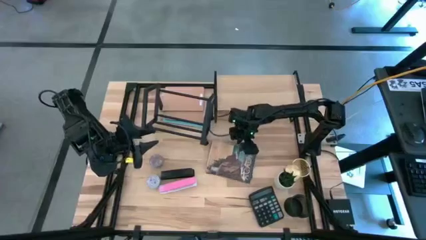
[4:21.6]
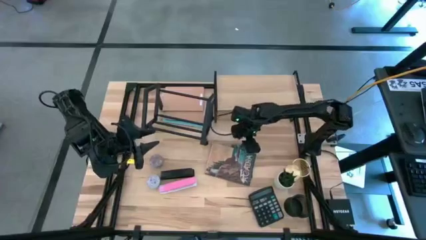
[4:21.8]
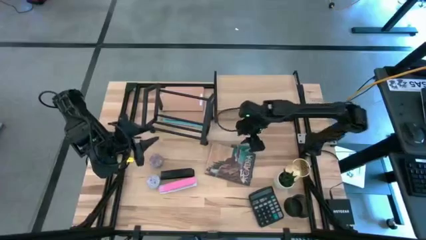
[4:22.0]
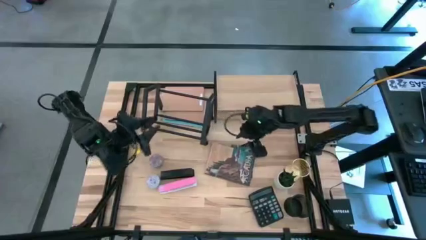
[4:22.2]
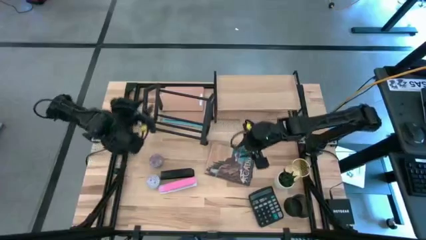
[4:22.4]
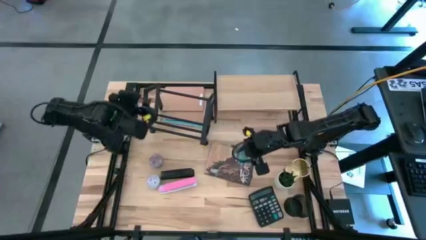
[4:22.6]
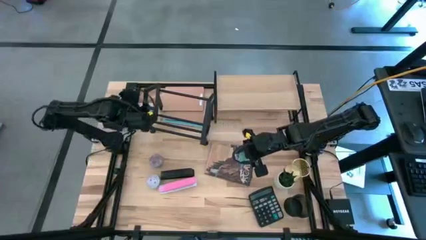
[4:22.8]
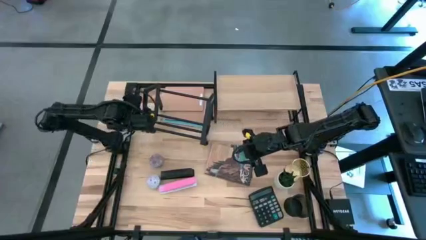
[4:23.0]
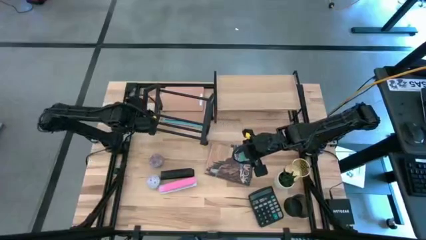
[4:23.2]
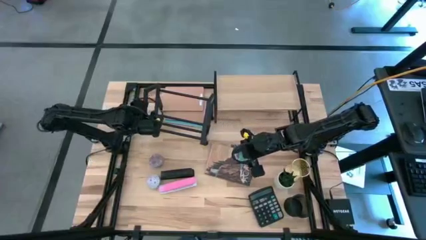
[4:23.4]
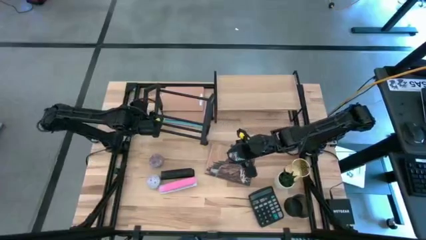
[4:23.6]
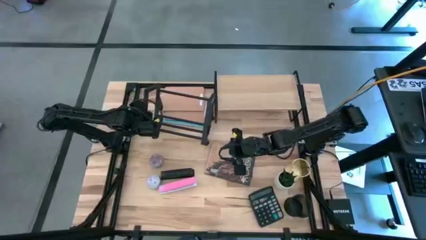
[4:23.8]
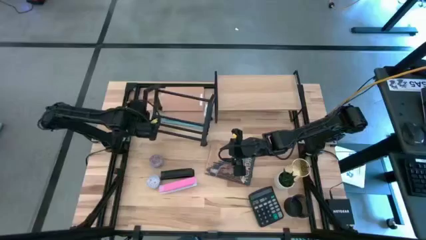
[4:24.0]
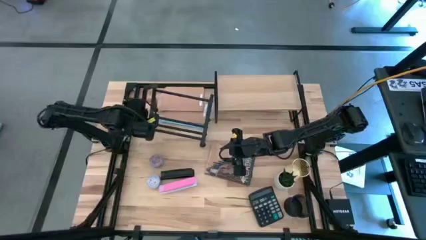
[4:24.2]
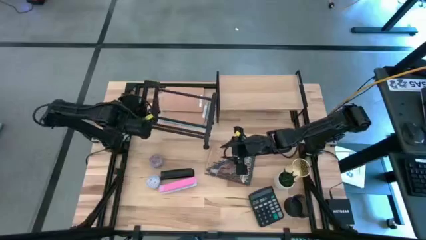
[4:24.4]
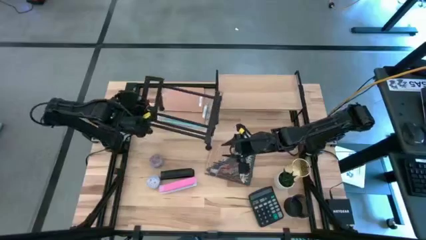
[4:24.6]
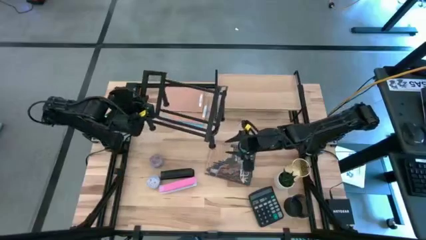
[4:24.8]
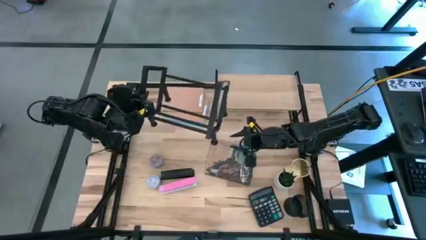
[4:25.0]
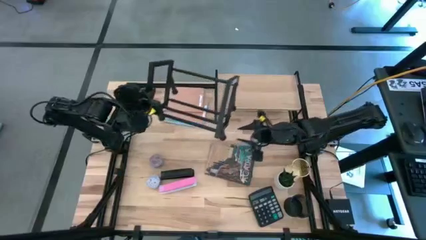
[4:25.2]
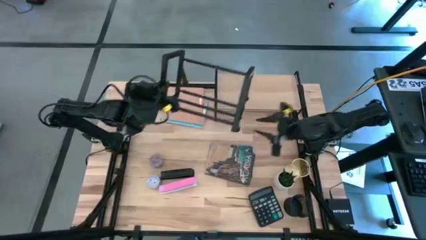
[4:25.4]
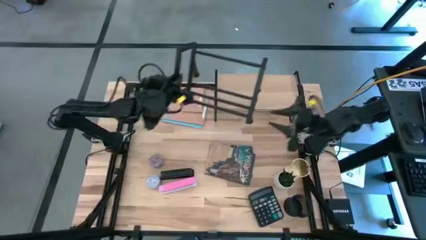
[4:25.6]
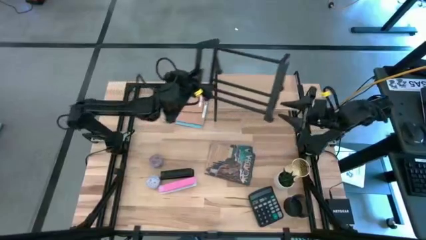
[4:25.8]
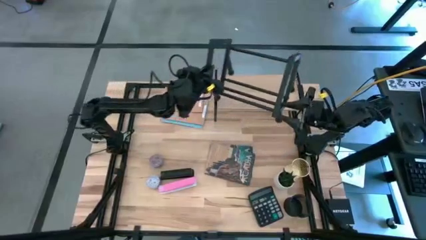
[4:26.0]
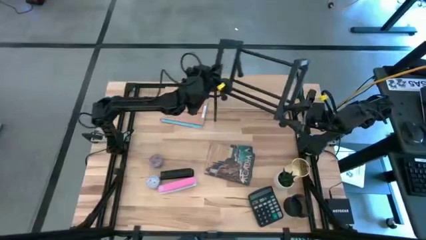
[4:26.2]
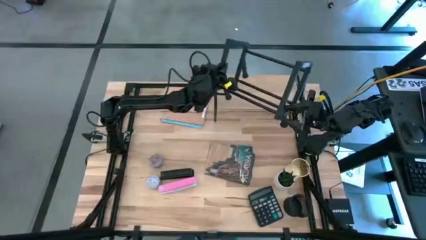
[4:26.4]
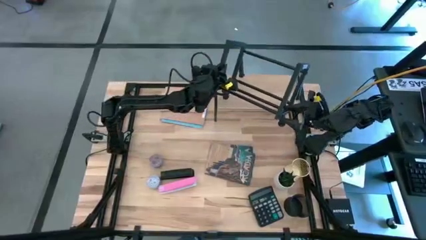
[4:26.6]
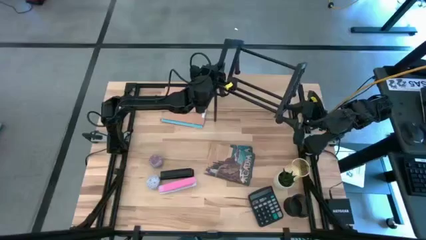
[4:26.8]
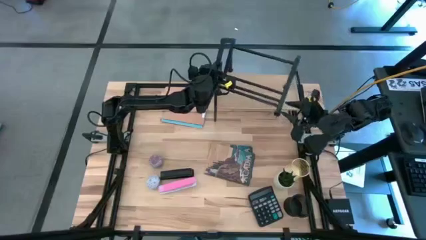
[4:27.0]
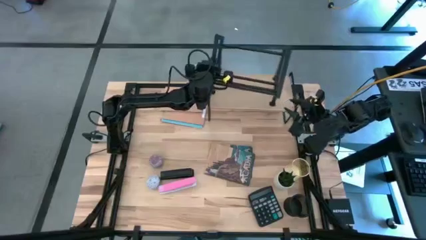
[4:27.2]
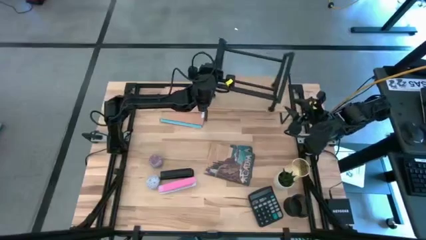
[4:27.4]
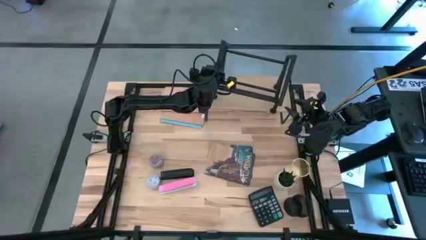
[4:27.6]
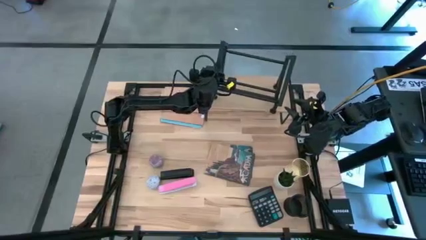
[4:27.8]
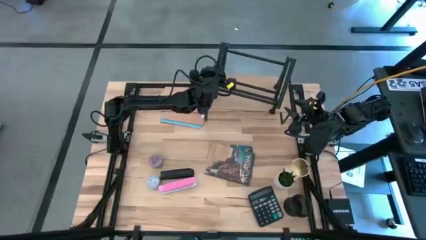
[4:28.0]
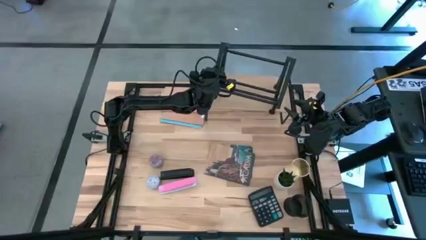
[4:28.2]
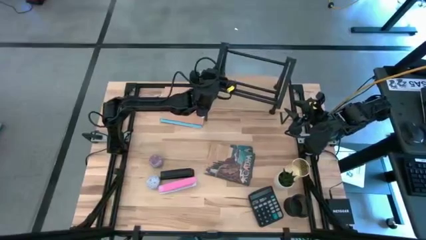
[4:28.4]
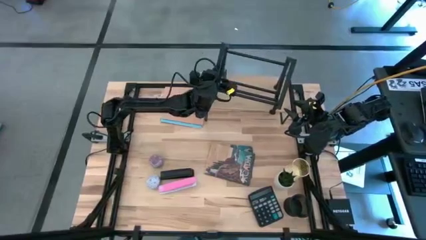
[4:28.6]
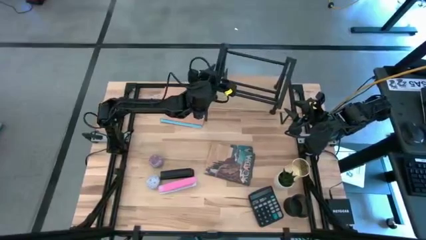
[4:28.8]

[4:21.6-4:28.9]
Task: Stock shelves
Put the book holder on top of the shelf

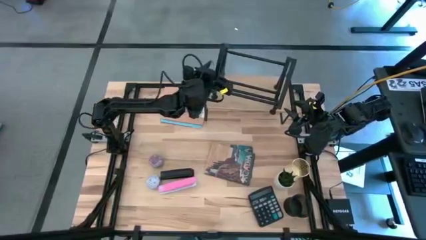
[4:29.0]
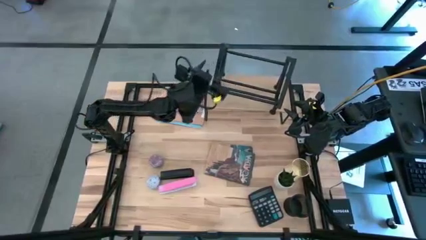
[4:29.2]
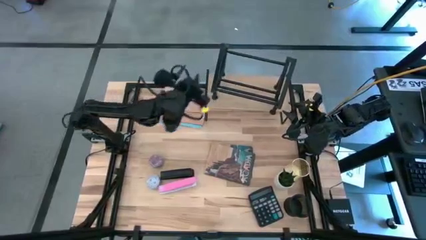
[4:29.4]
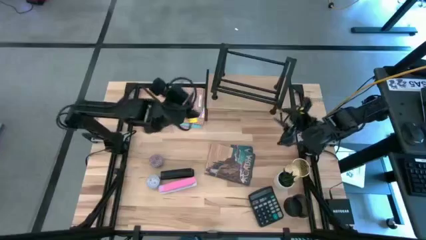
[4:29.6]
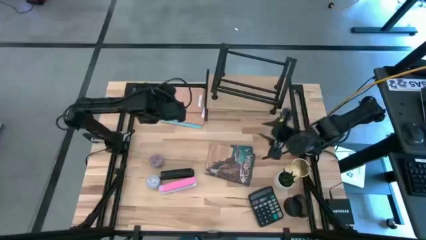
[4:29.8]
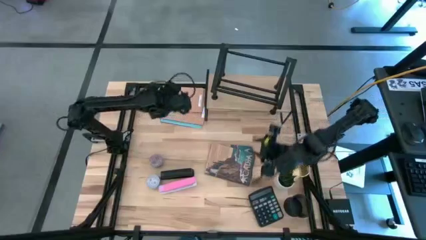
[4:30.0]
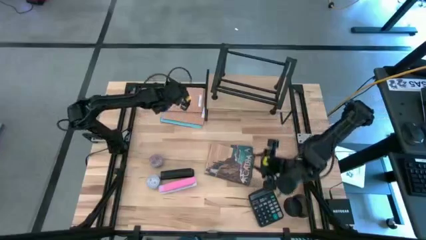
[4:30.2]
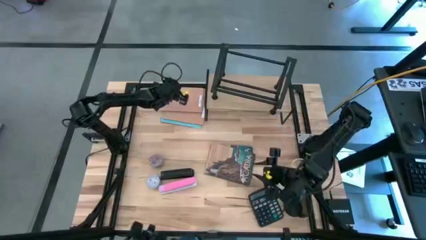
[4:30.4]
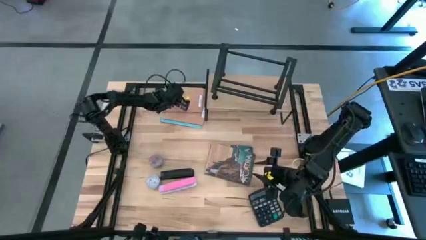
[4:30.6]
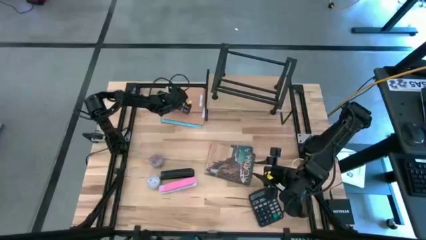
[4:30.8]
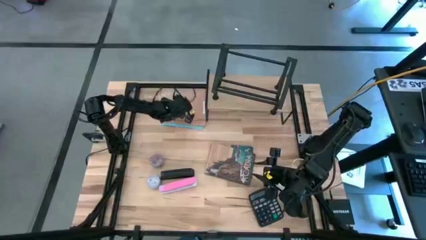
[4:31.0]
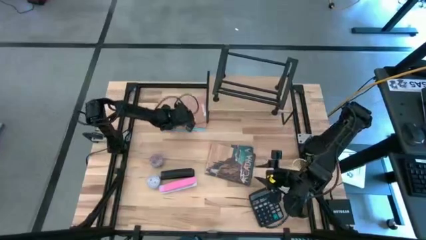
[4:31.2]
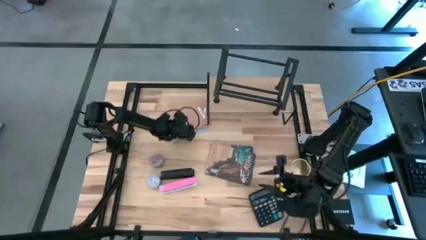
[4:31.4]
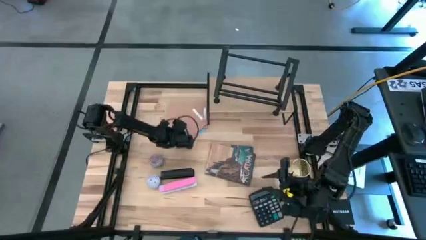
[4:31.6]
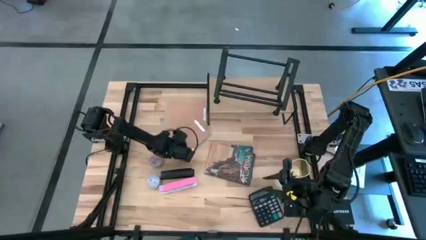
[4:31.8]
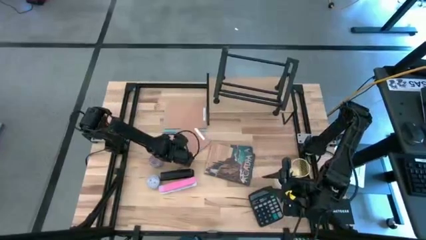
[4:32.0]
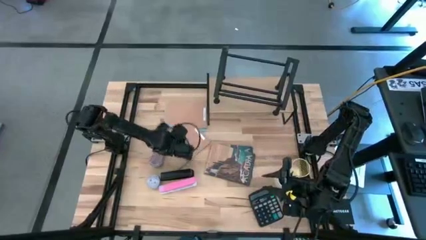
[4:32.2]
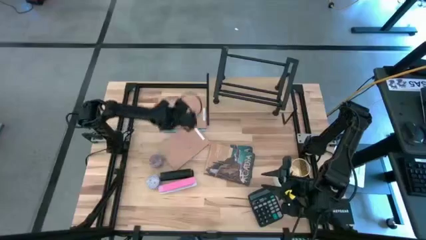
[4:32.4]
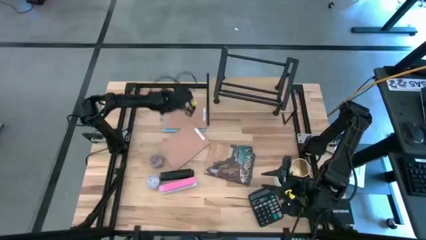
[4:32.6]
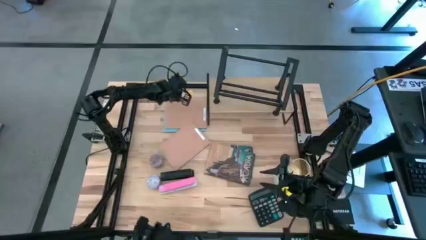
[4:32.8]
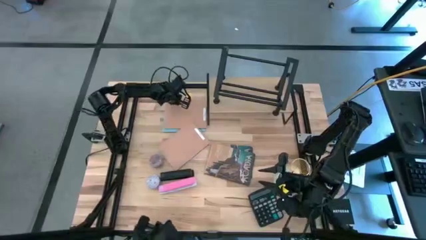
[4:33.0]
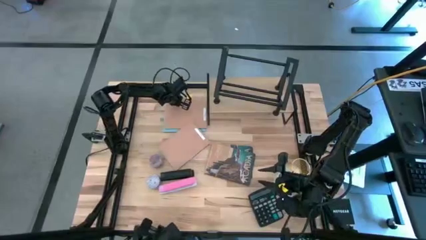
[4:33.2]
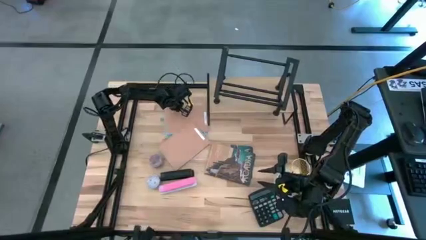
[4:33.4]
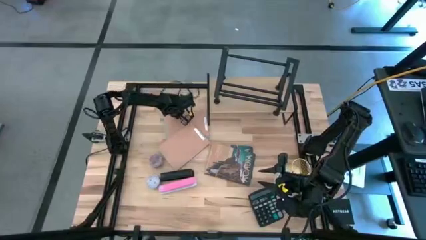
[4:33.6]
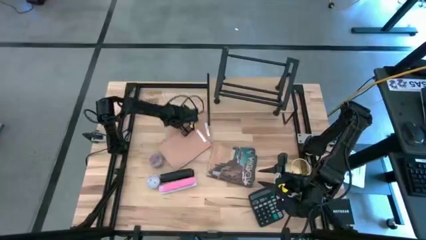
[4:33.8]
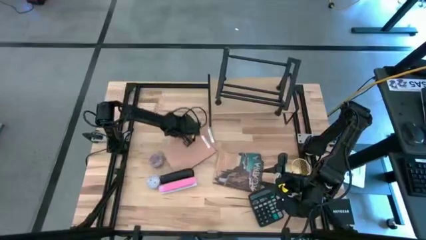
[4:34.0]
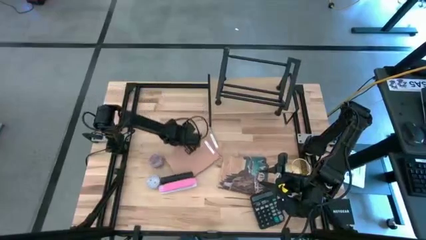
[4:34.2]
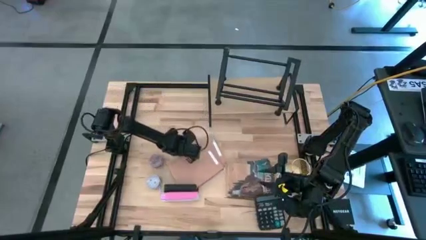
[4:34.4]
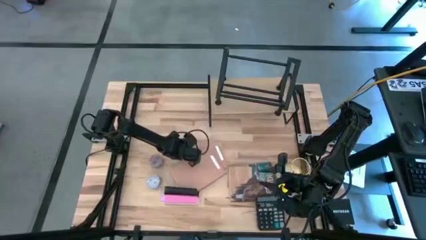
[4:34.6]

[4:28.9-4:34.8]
Move books closer to the center of the table

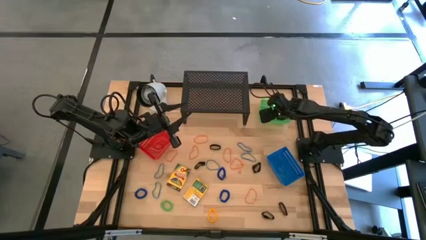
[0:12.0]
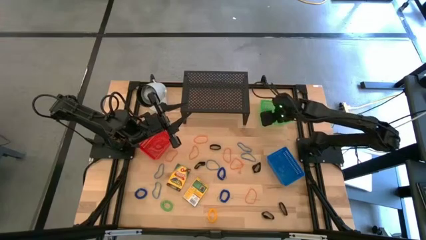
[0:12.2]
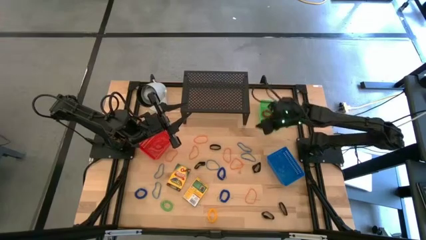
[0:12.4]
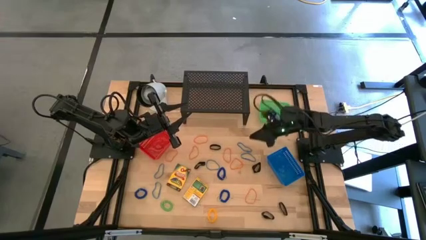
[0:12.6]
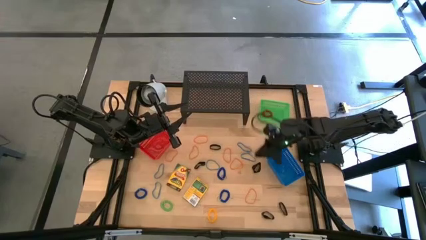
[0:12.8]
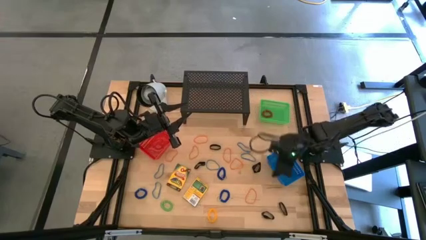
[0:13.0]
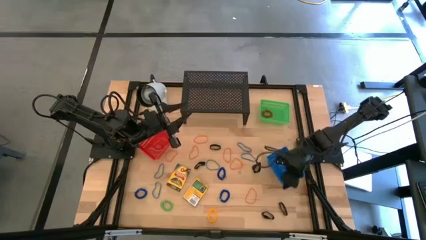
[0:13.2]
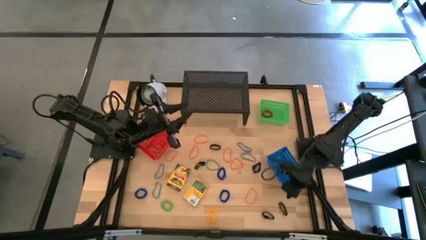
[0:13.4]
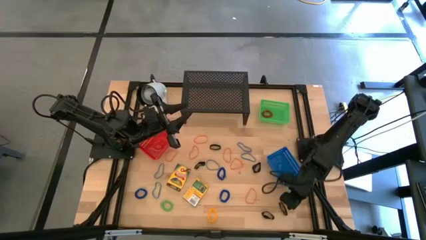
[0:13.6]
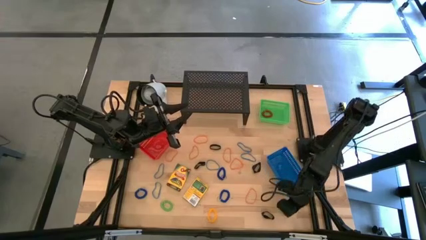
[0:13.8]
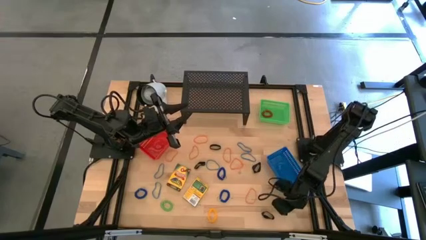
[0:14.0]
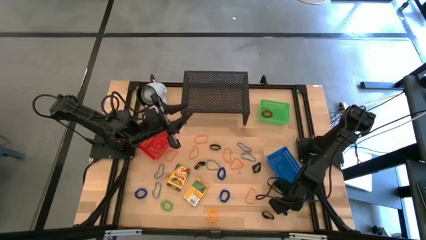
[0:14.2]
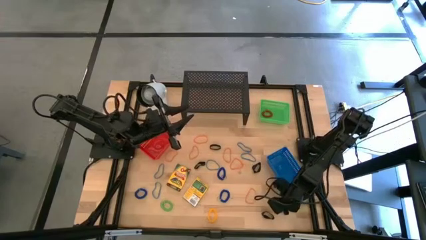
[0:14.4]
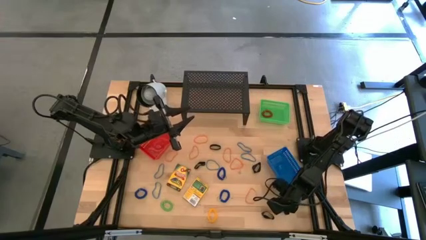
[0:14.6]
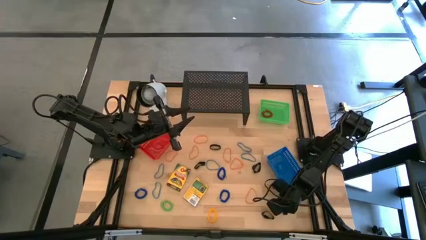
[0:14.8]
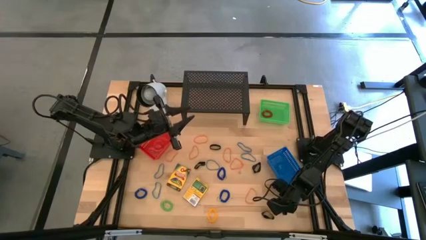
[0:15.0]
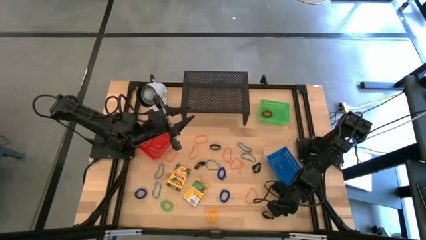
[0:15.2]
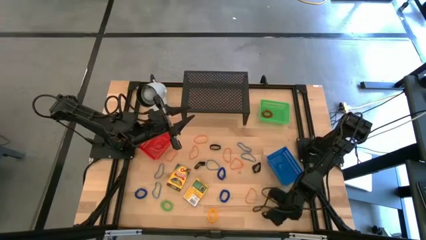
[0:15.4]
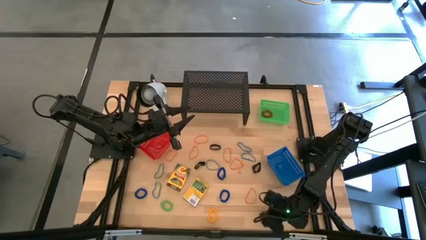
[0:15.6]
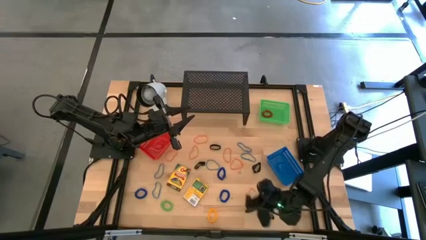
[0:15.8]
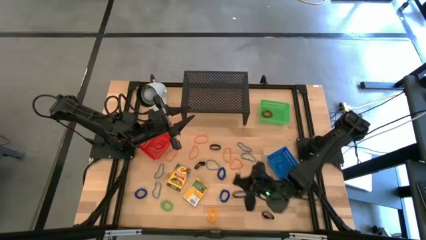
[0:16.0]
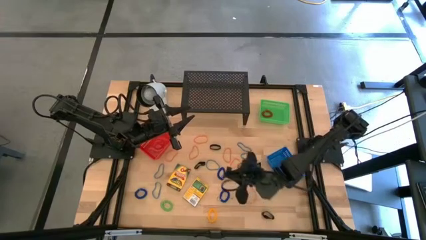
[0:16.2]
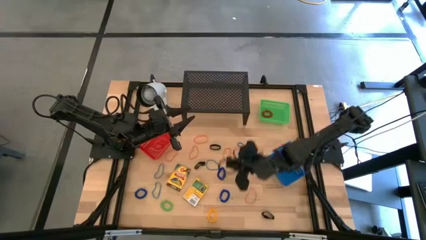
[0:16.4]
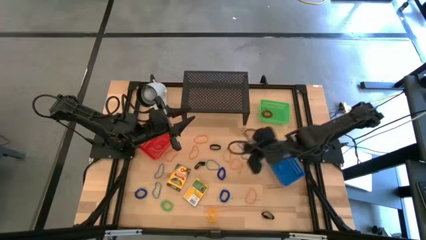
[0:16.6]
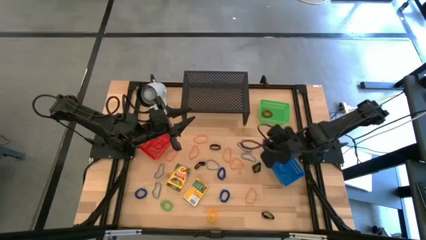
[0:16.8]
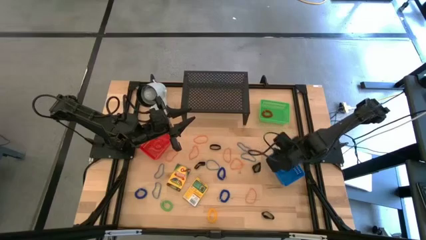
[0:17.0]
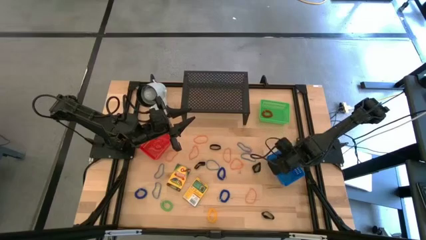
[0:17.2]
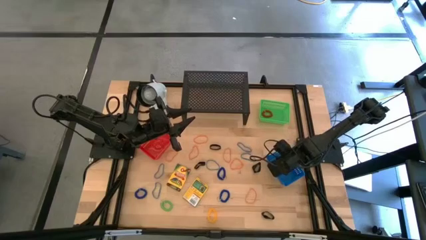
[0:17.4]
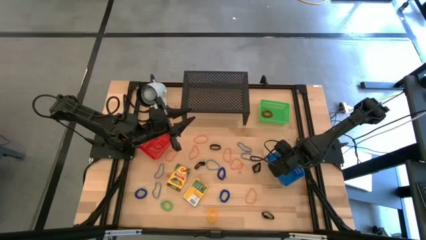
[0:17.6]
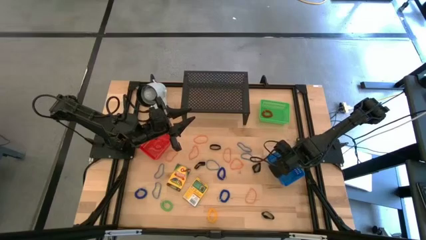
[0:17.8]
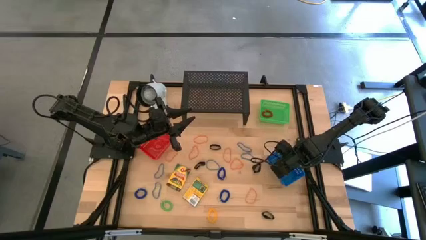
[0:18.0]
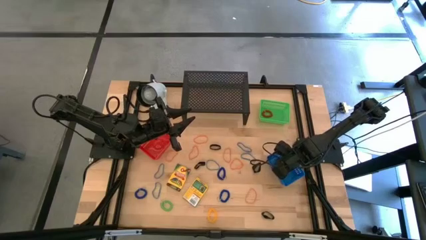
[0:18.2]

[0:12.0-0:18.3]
Task: Pick & Place Office Desk Supplies
Put the black rubber band into blue bin
